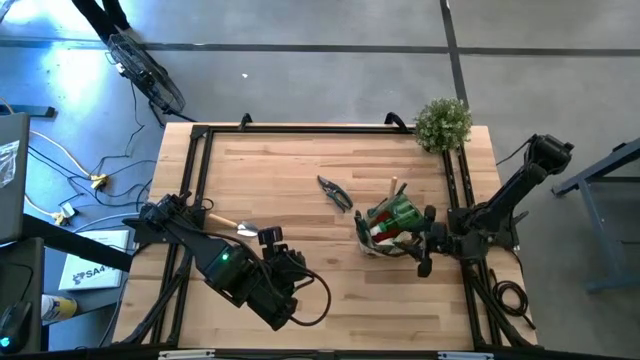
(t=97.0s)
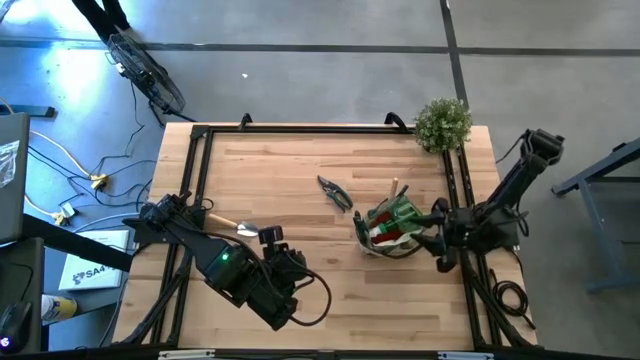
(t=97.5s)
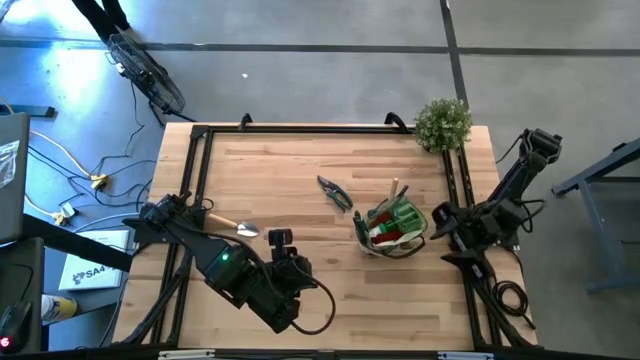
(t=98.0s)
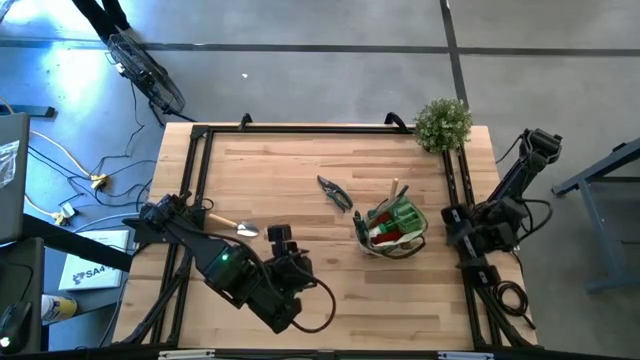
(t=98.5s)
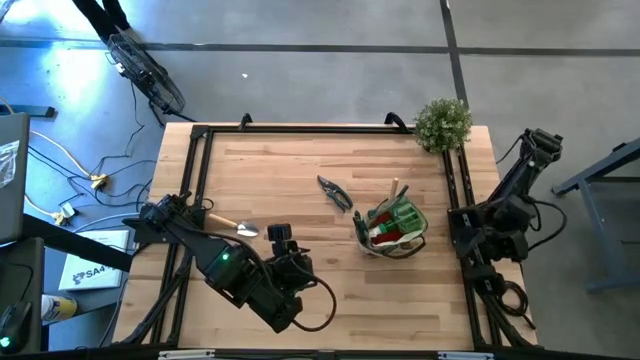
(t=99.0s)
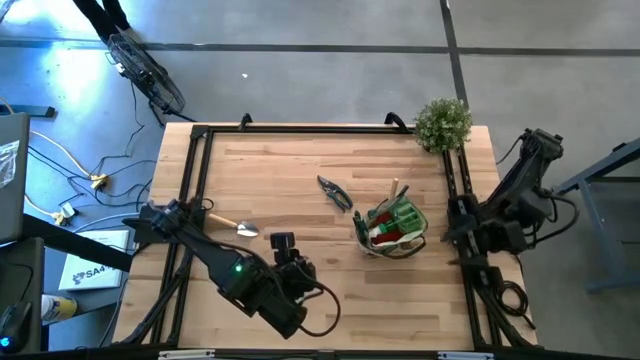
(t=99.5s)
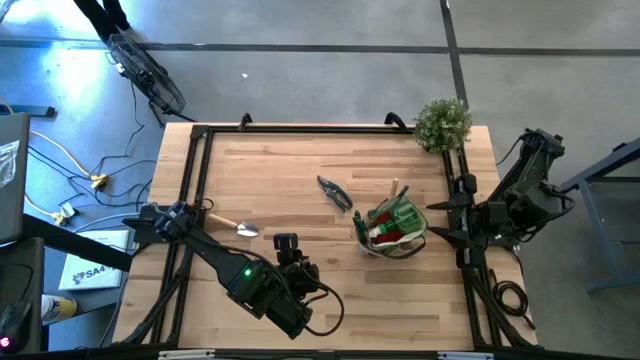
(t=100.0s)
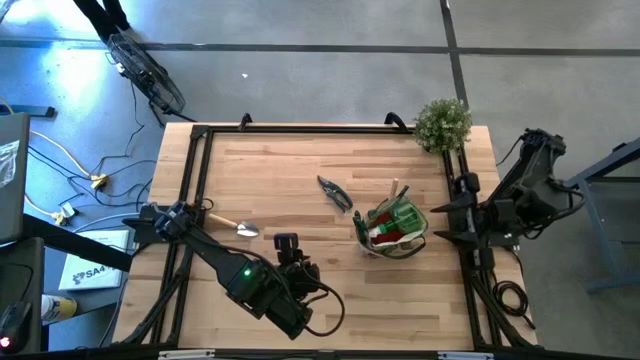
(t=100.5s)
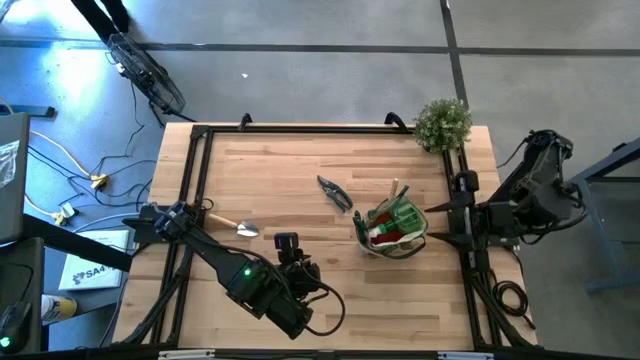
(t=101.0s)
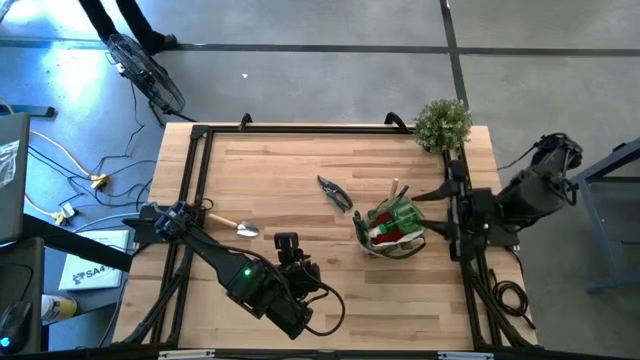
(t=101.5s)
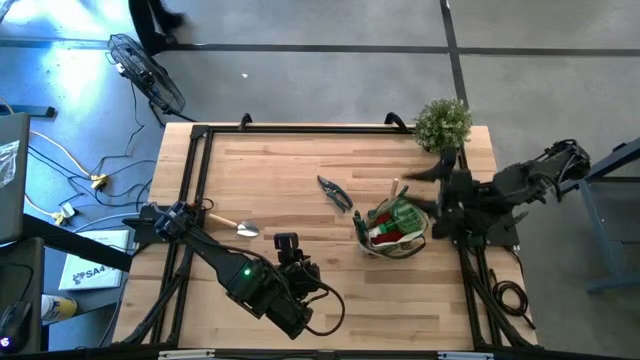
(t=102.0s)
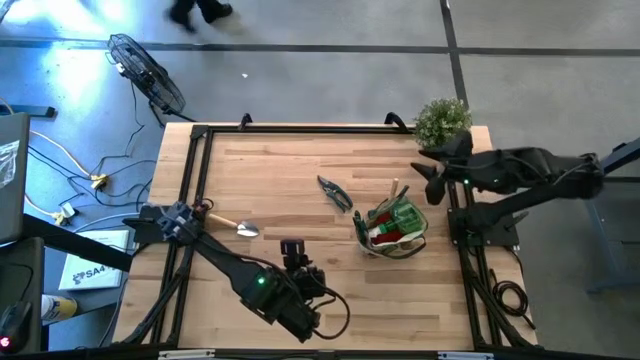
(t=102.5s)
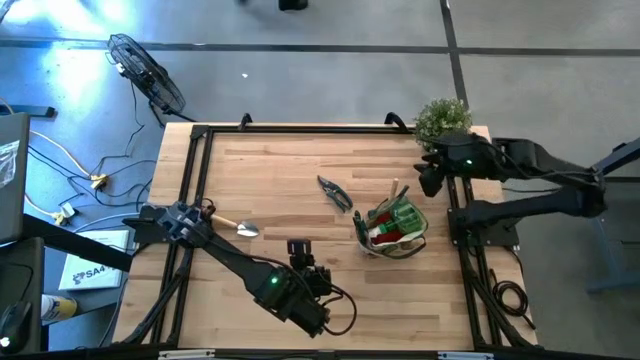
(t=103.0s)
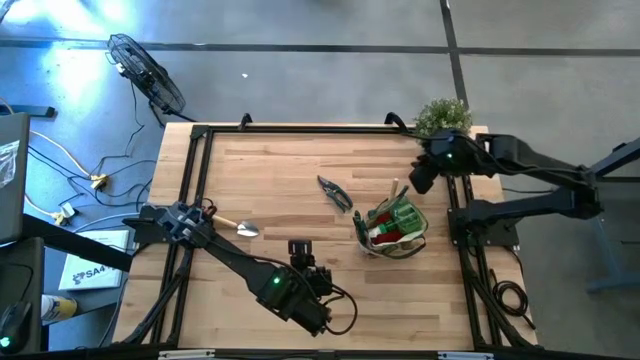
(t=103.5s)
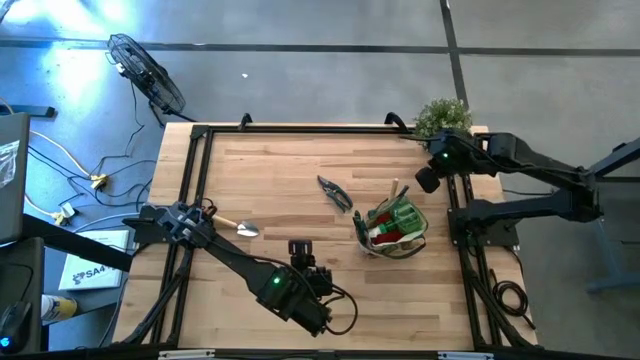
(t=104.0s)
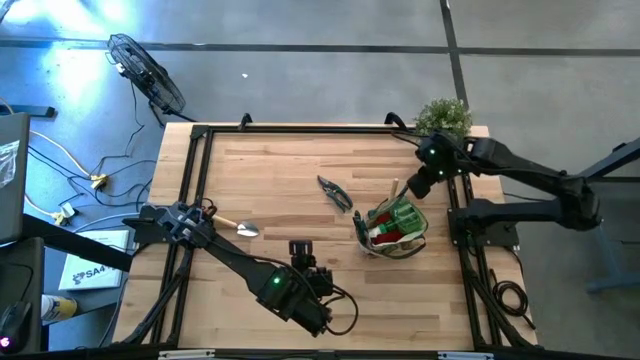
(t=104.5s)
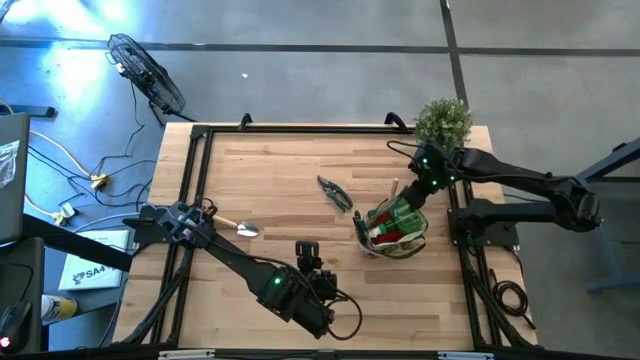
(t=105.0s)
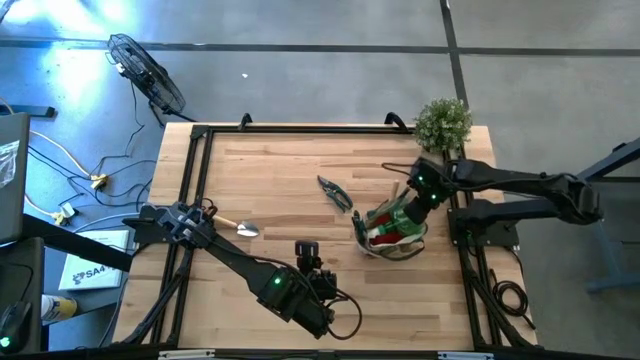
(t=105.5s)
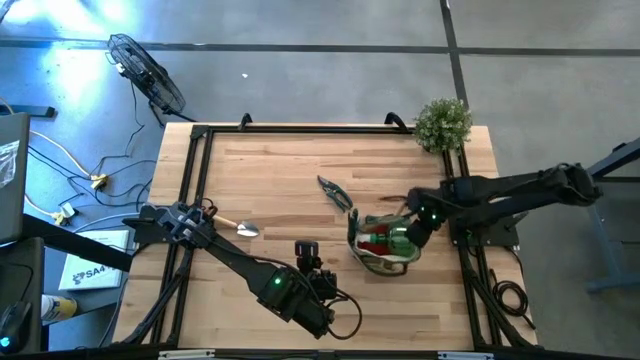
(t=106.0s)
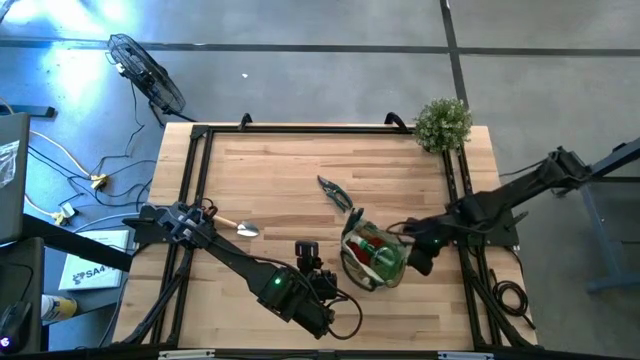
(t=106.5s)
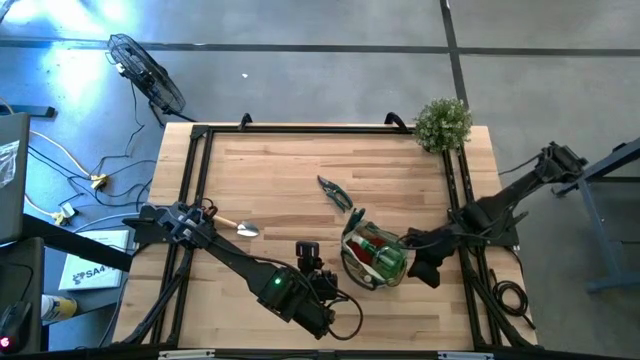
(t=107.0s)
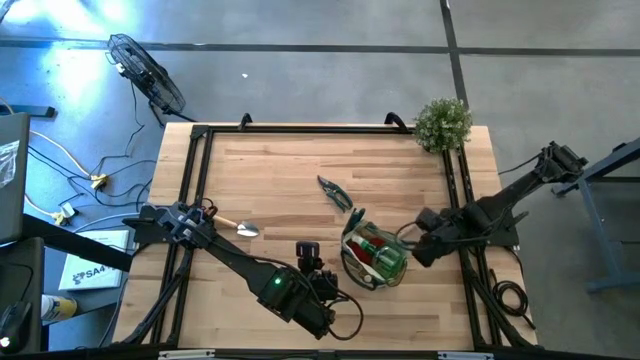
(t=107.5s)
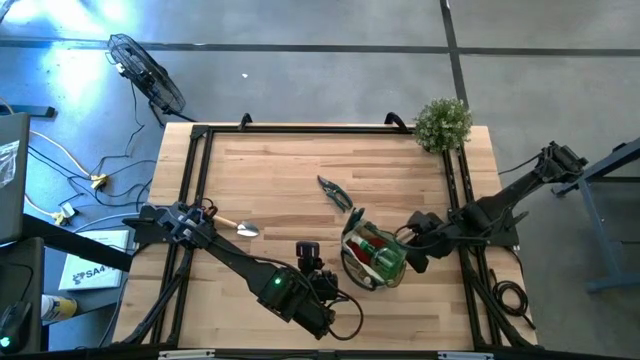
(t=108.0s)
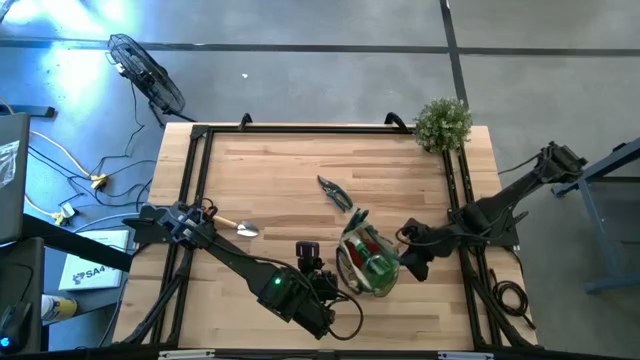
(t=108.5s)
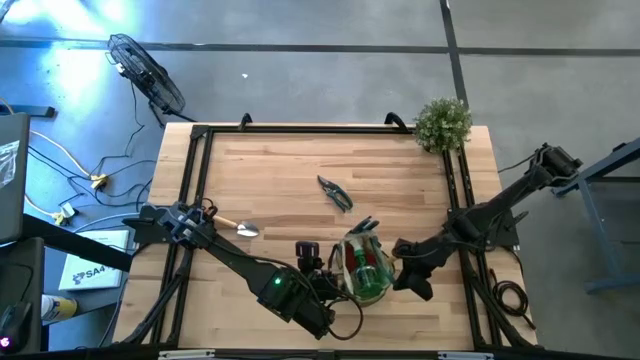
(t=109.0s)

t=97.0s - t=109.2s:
Task: Pick & Place Garden tools in Gardening bag
Adjust the gardening bag

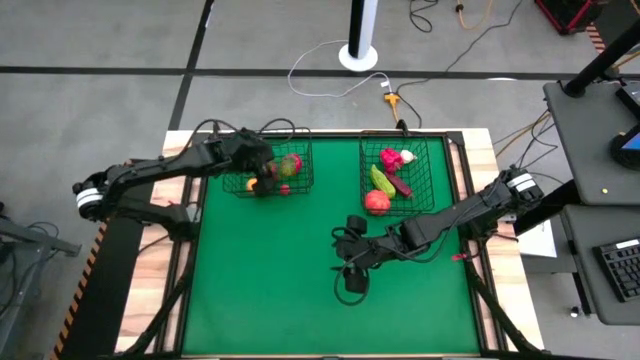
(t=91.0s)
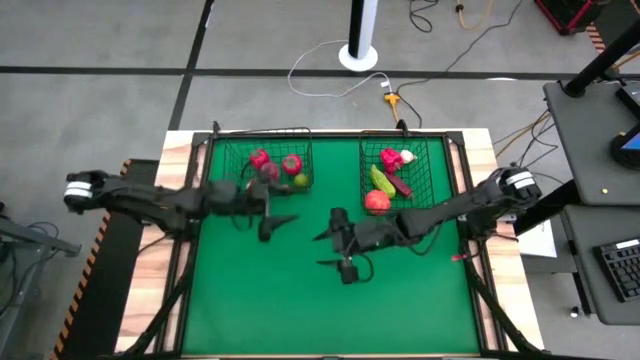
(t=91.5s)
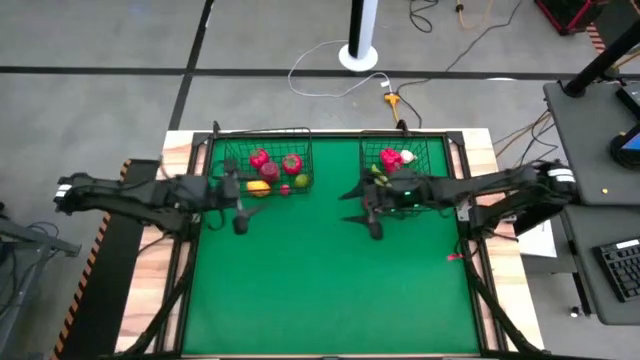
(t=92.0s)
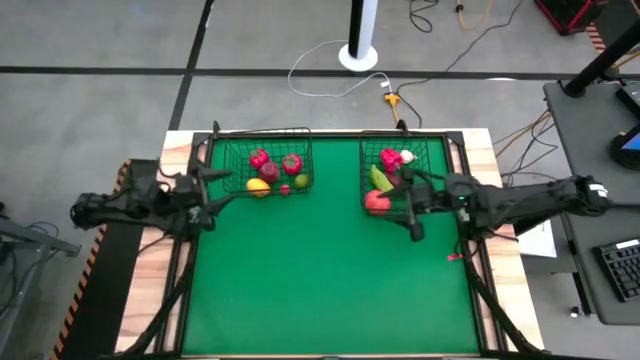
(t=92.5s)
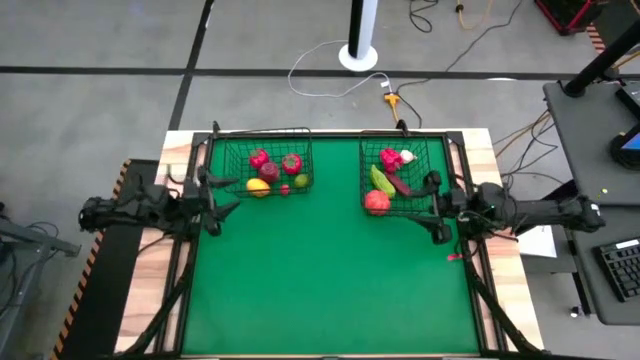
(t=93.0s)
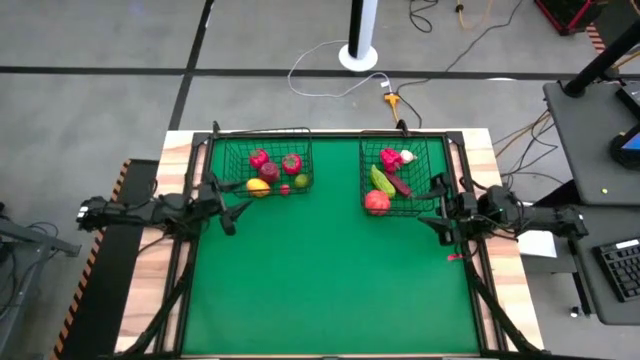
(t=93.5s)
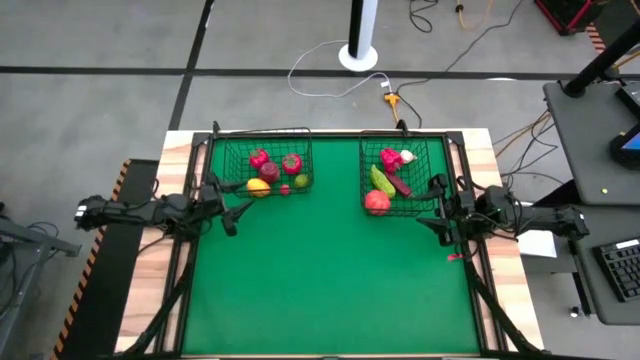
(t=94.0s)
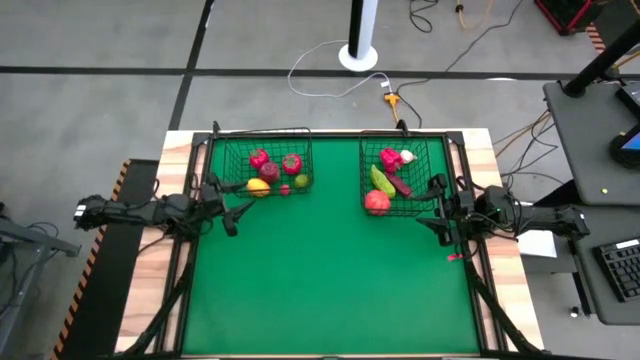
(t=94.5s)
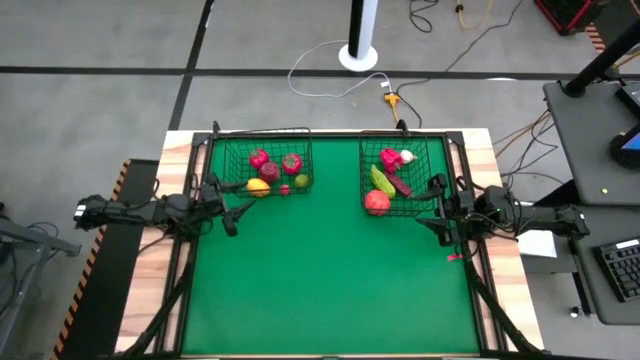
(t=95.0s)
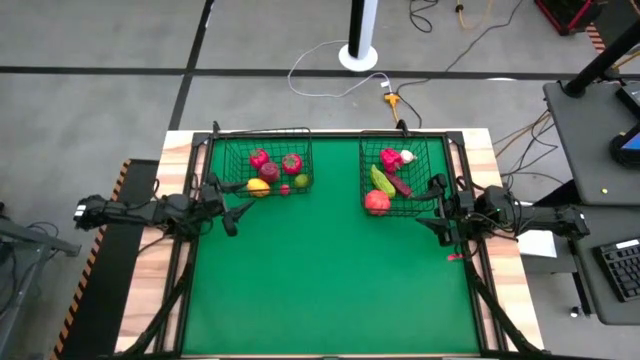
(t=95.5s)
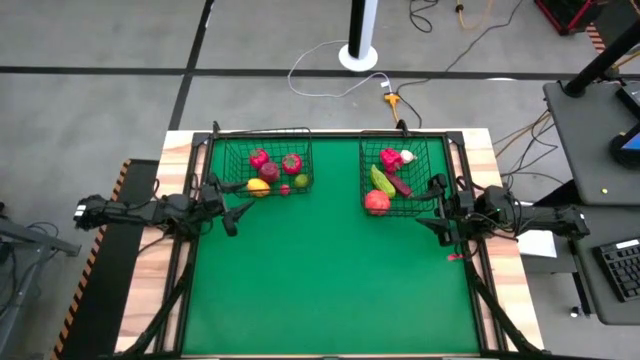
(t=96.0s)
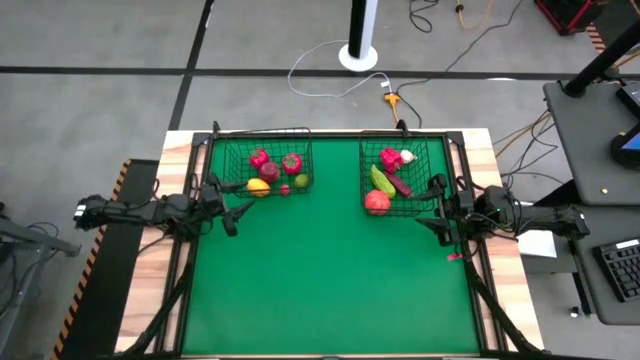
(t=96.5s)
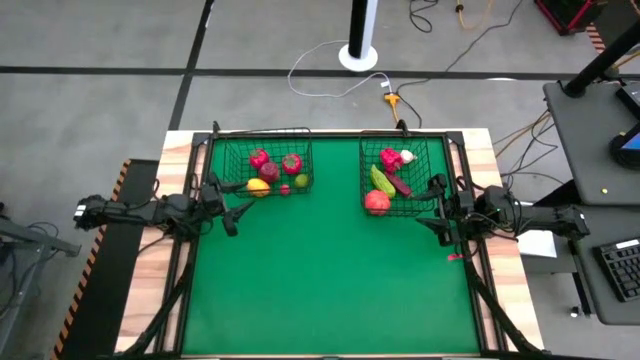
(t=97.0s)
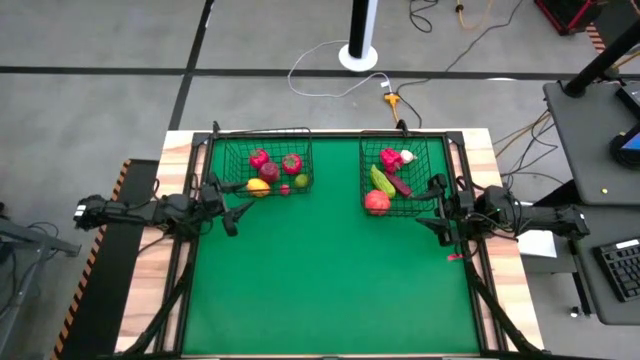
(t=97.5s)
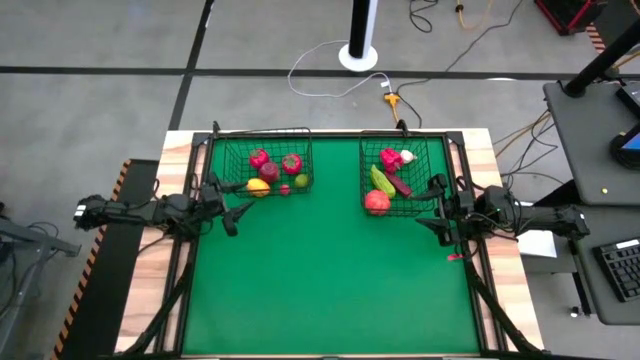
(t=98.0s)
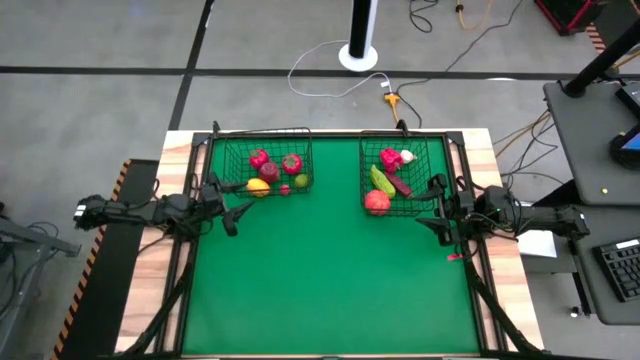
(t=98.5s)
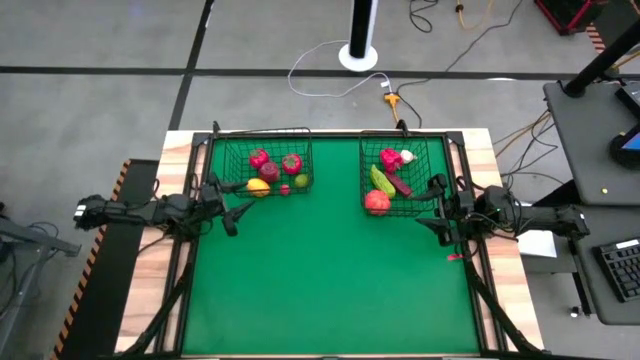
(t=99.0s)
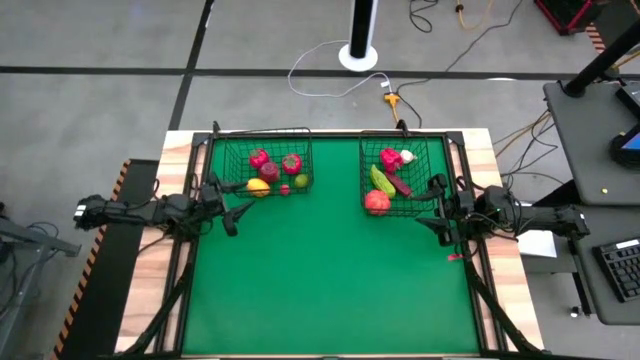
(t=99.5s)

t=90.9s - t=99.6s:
Task: Sort produce into baskets
Return to Home Position
